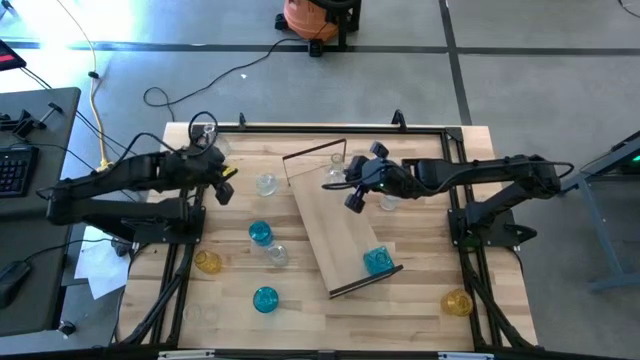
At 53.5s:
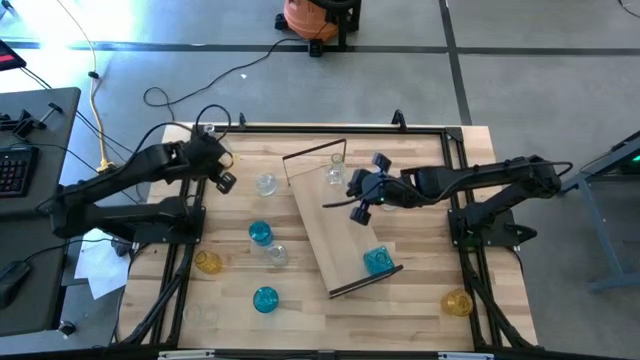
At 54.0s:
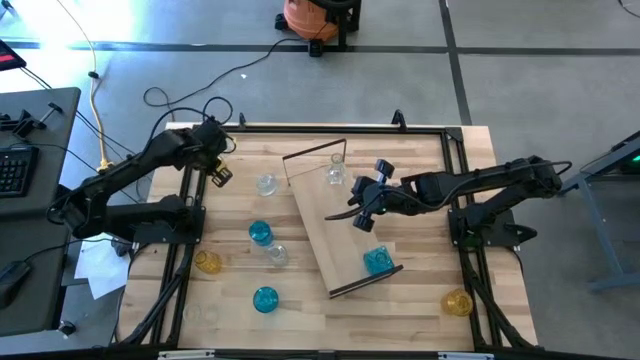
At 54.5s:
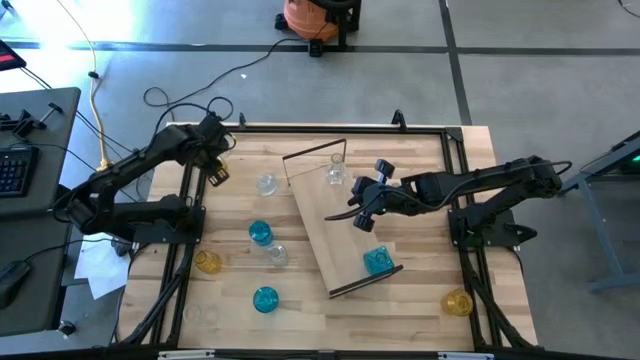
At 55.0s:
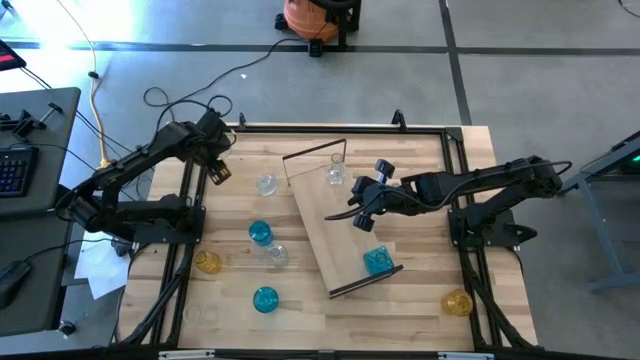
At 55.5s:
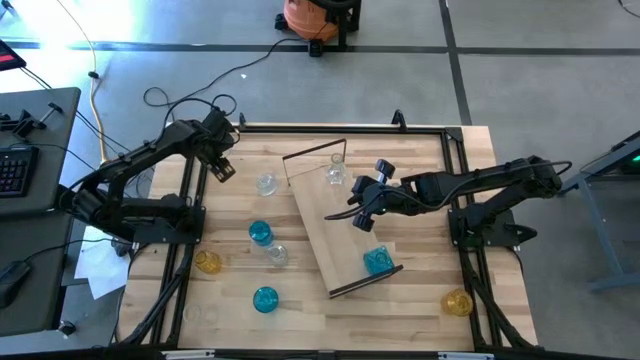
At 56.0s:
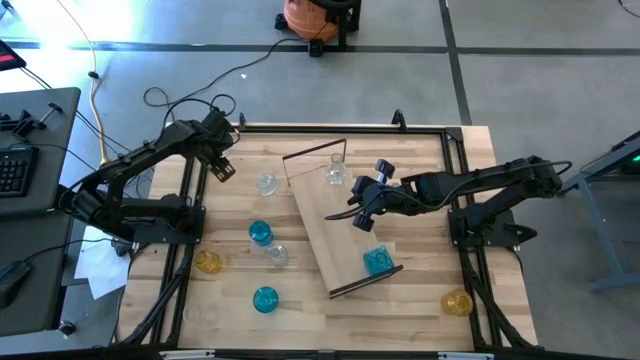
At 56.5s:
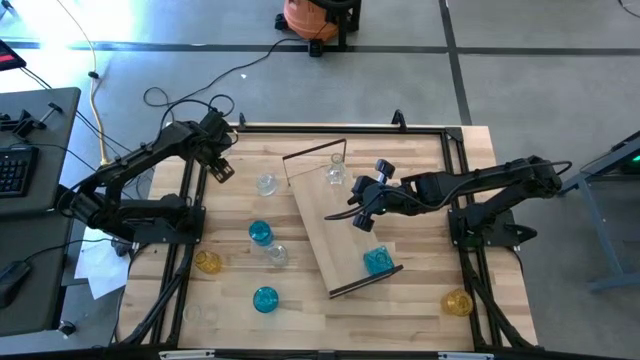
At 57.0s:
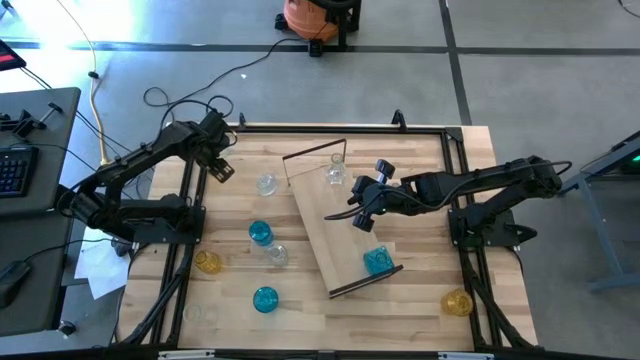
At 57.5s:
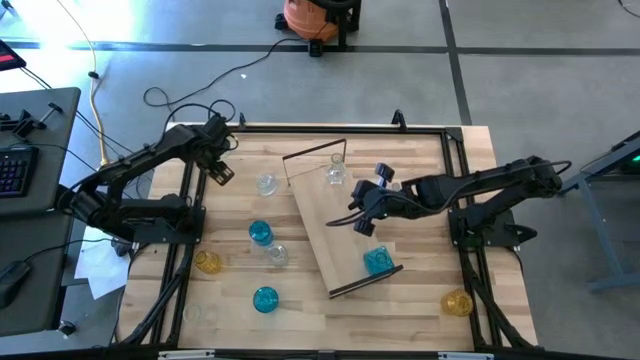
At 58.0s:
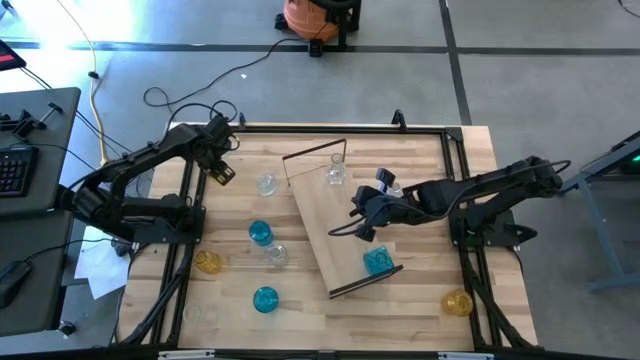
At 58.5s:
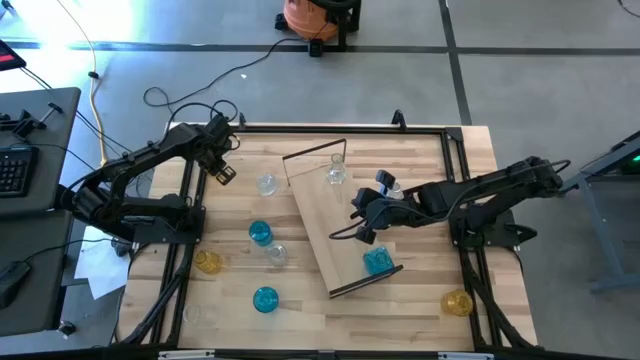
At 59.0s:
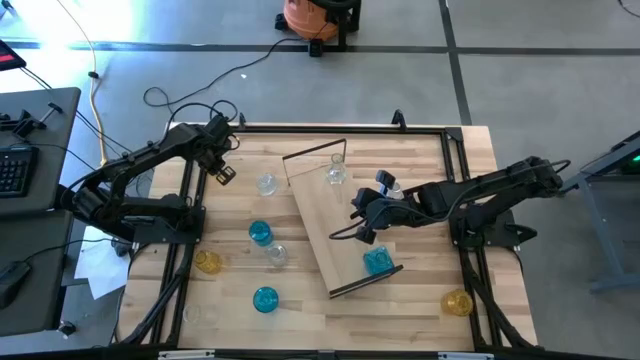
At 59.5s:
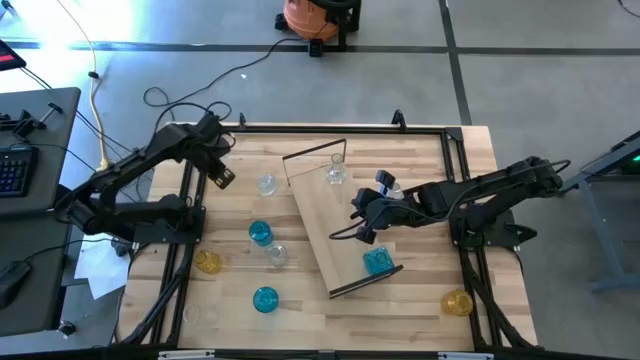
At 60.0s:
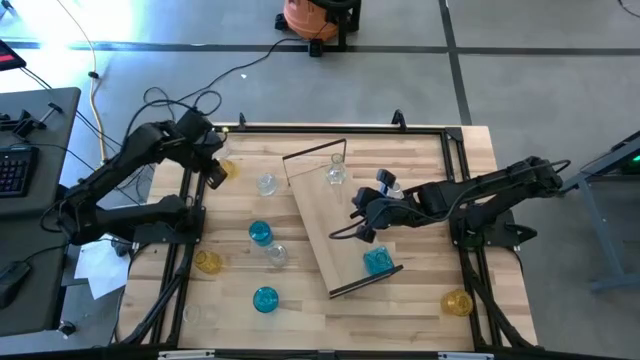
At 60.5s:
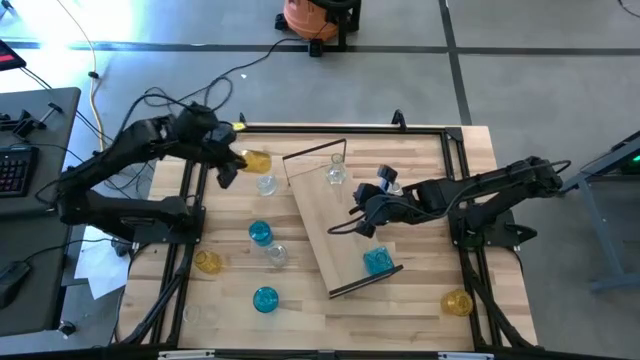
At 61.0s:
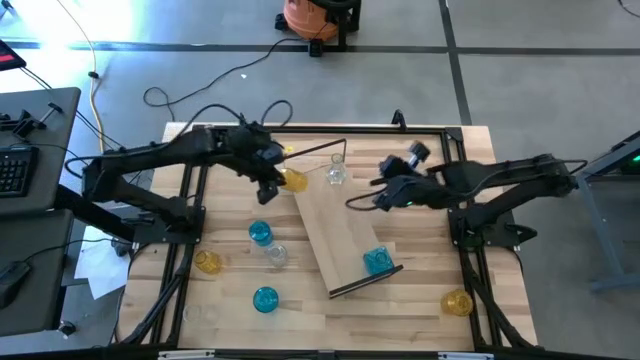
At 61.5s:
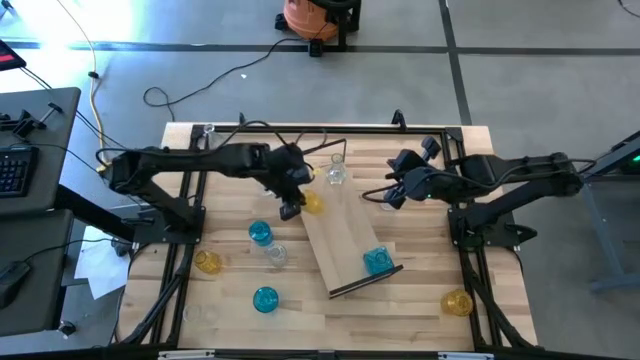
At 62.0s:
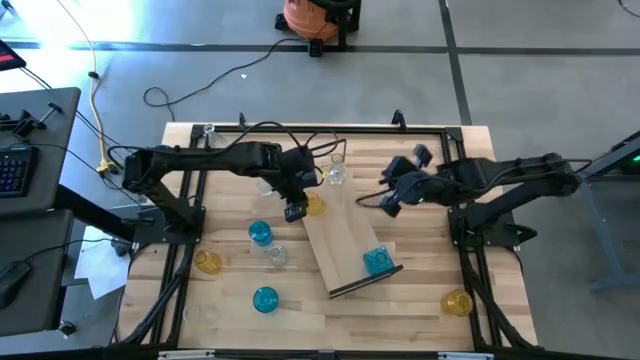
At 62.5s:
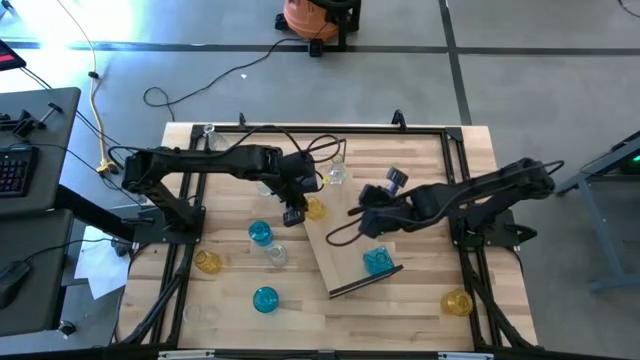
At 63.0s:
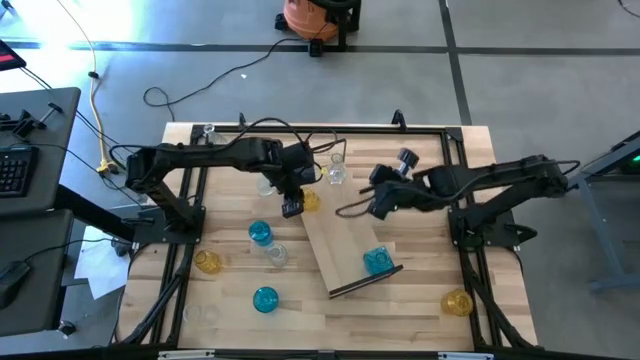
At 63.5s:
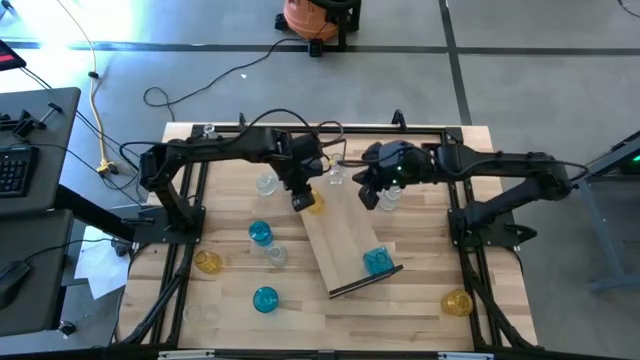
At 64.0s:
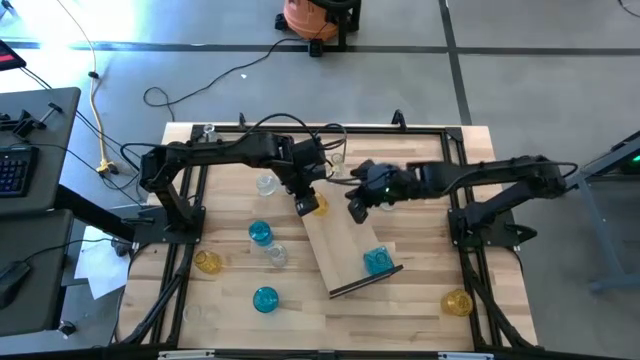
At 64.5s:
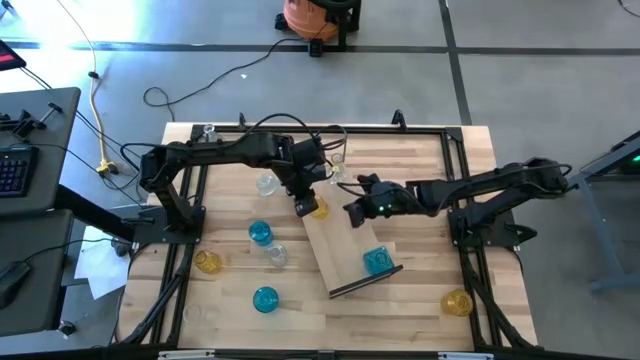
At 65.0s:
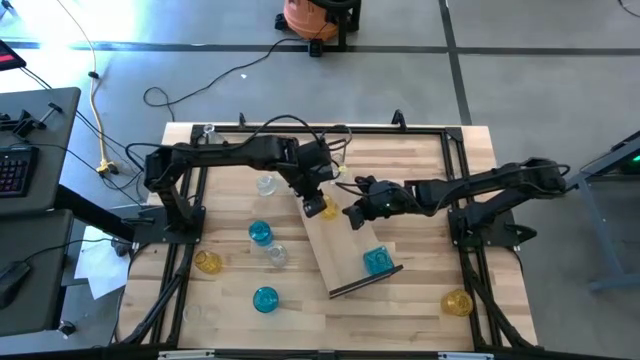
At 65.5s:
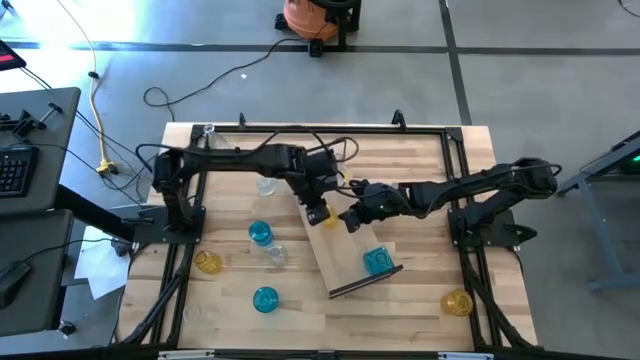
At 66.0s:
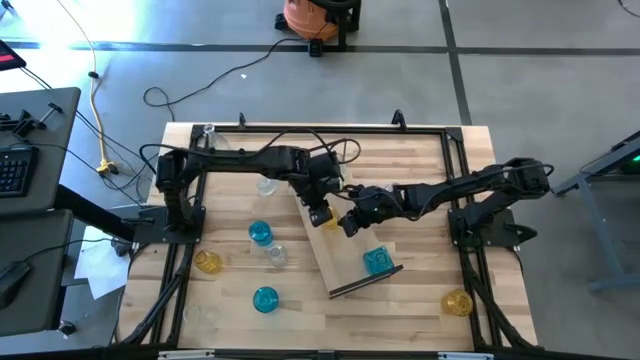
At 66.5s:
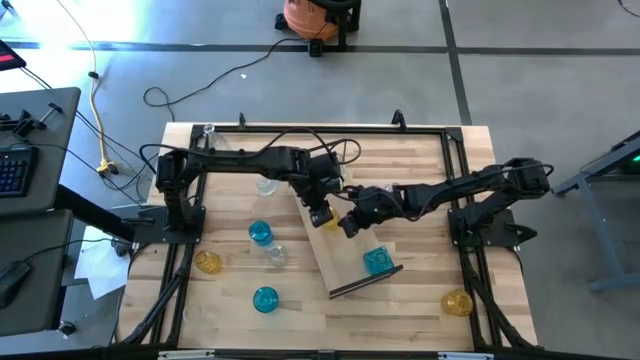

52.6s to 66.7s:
Task: sort vases onto shelf
Put the yellow crystal vase on the shelf

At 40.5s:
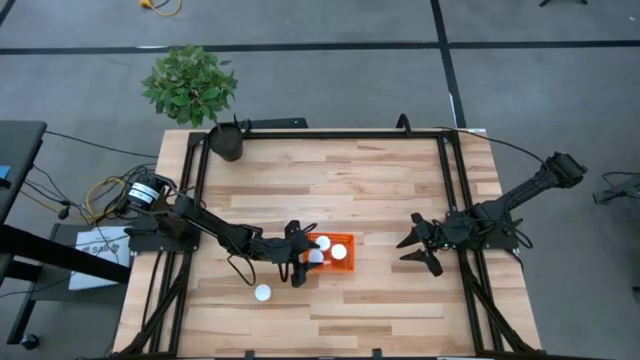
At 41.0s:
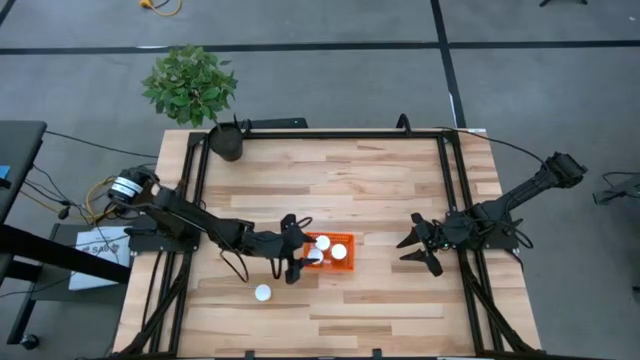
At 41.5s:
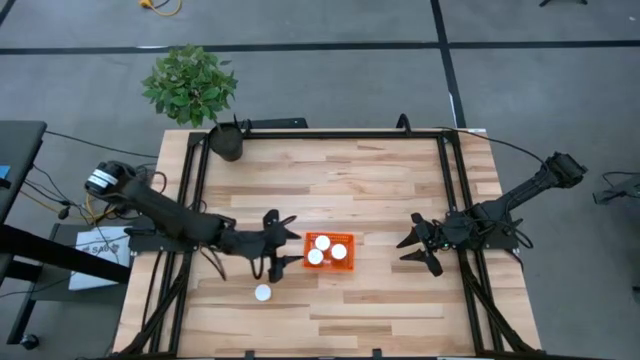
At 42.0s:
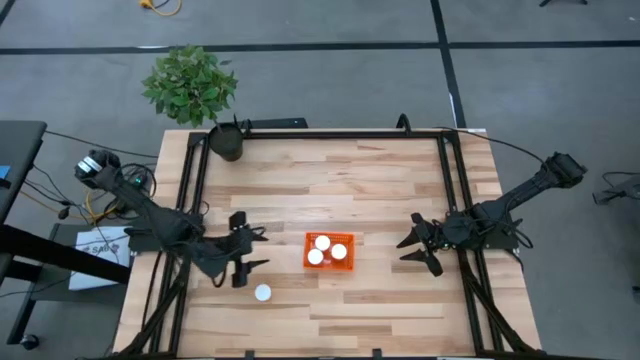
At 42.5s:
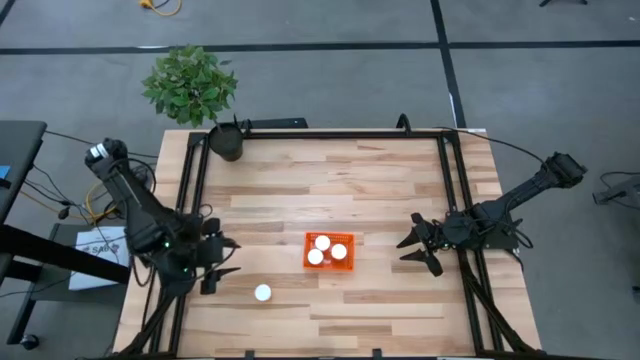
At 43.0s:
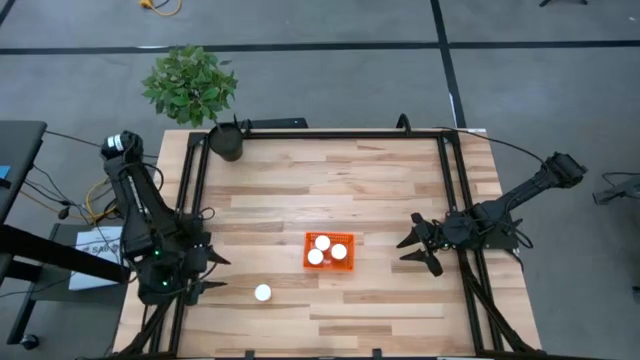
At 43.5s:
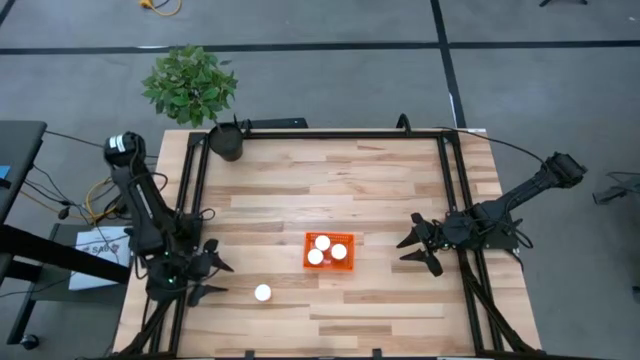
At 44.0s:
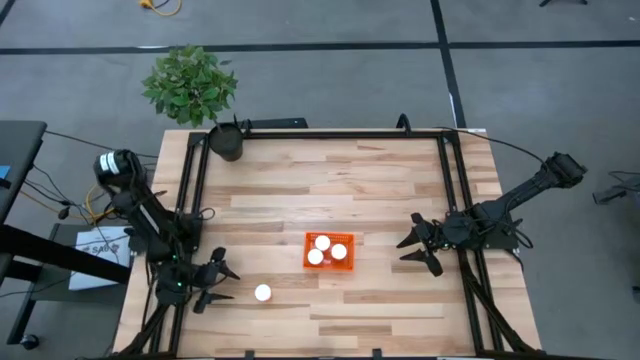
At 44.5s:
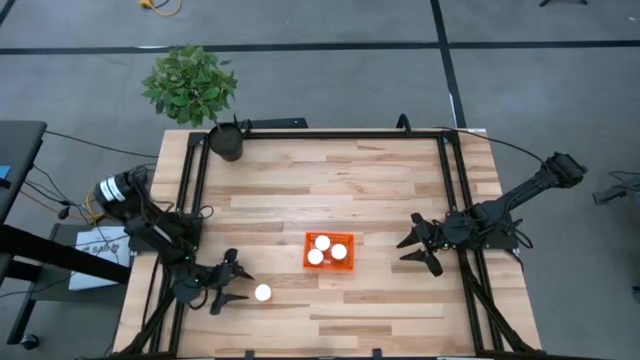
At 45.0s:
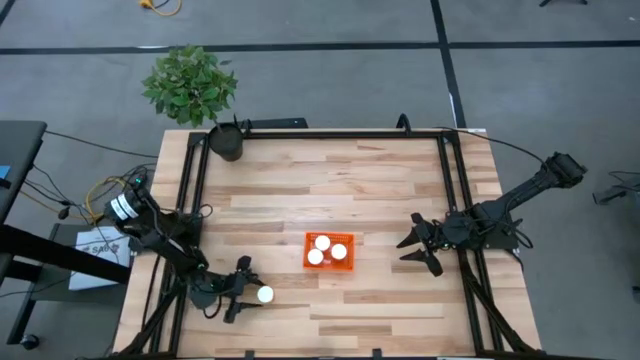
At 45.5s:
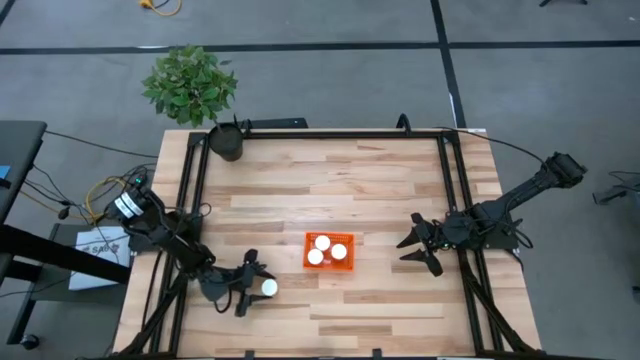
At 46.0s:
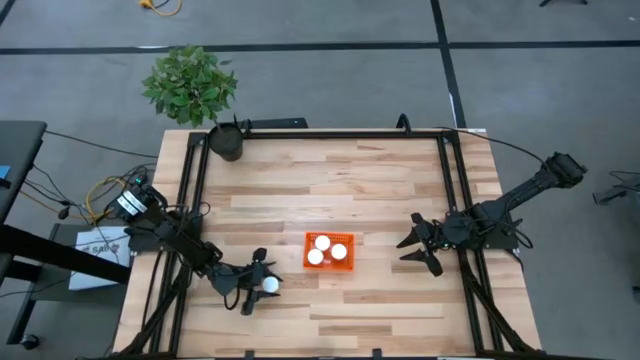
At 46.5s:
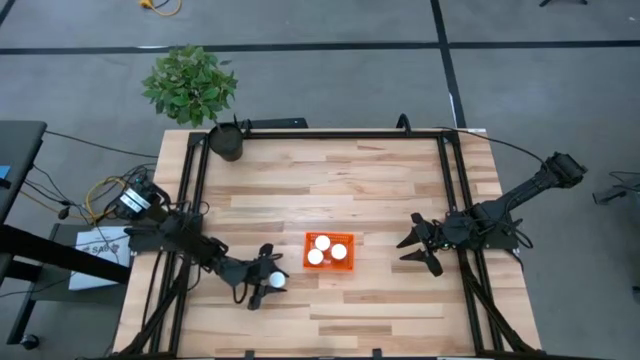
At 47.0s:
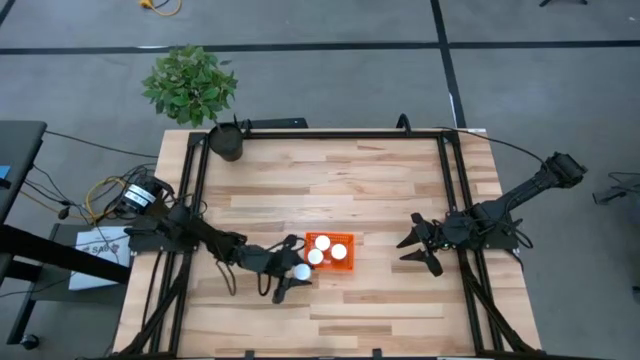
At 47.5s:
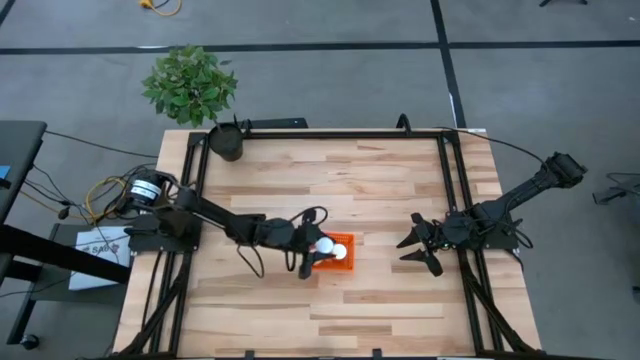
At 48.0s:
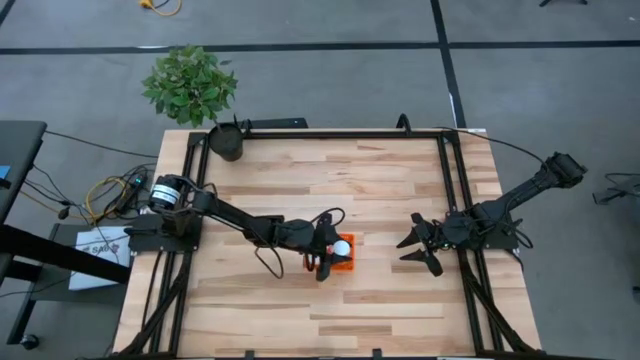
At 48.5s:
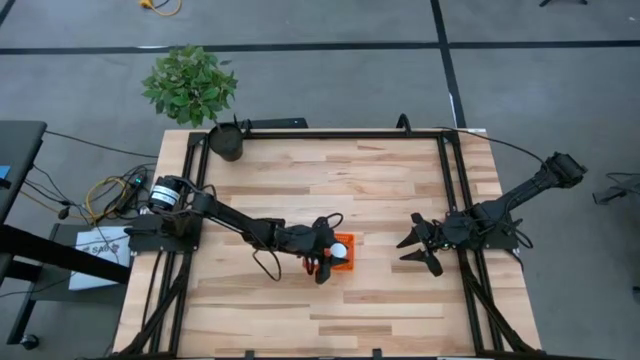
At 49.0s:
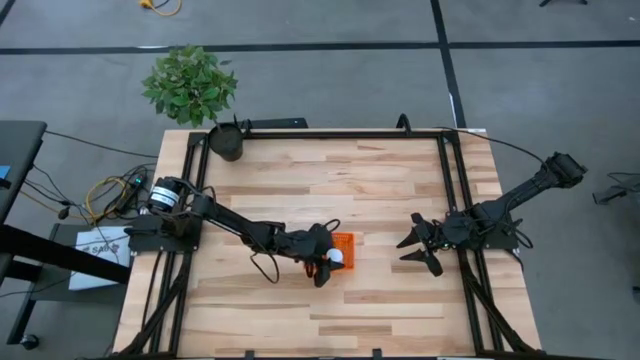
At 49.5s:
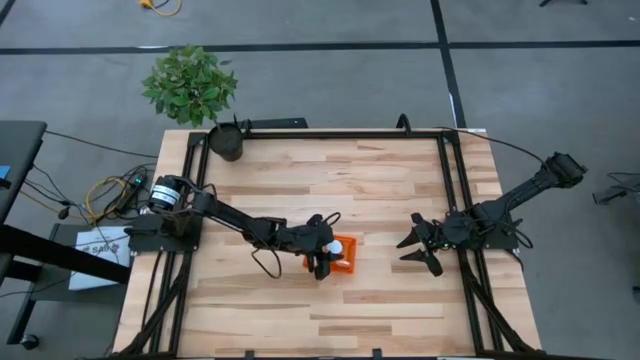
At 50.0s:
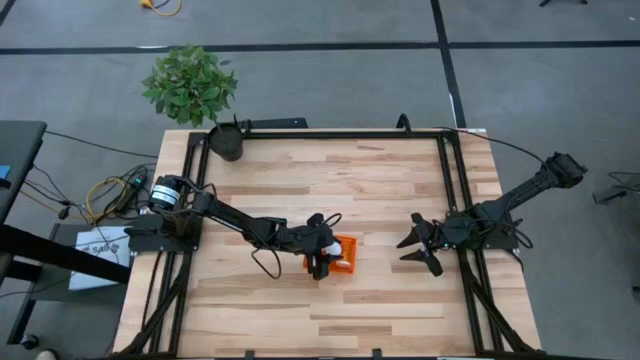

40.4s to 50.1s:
Task: Pick and place pill bottles into a basket
Put the orange pill bottle into the orange bin
